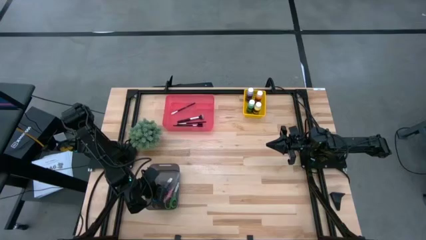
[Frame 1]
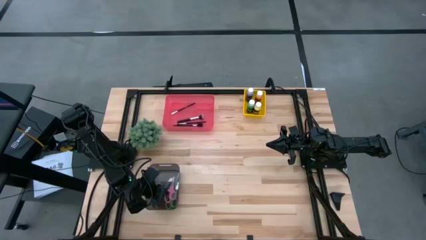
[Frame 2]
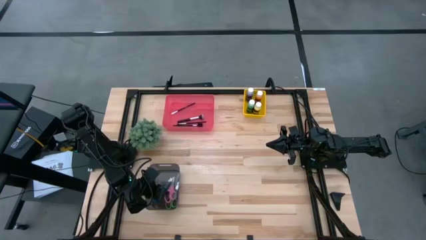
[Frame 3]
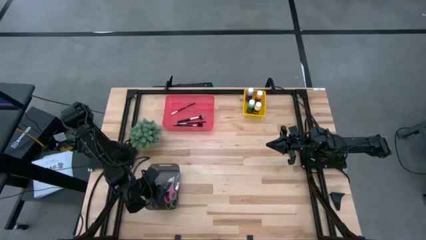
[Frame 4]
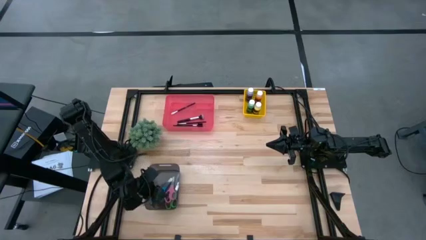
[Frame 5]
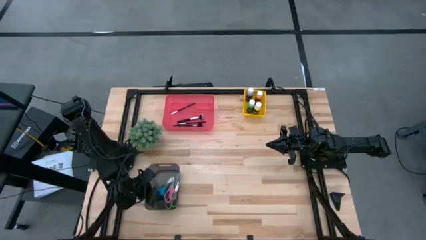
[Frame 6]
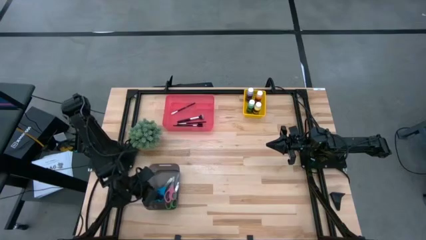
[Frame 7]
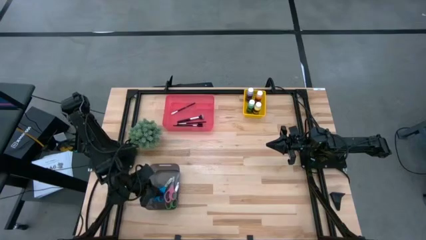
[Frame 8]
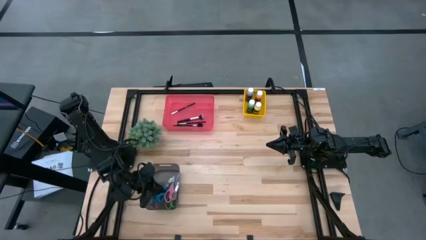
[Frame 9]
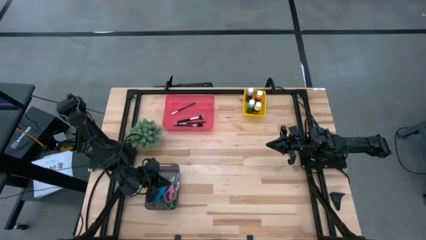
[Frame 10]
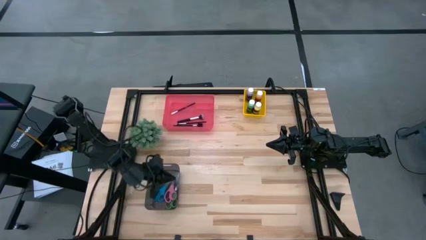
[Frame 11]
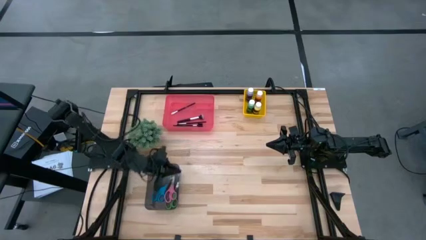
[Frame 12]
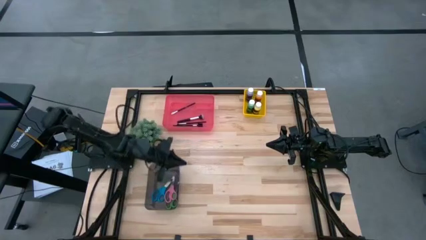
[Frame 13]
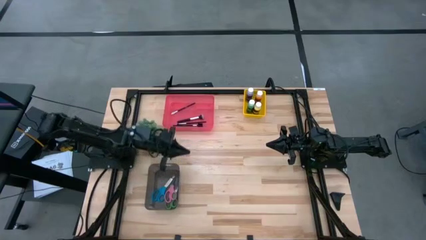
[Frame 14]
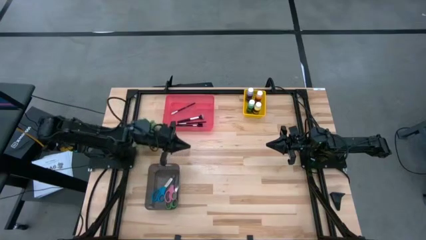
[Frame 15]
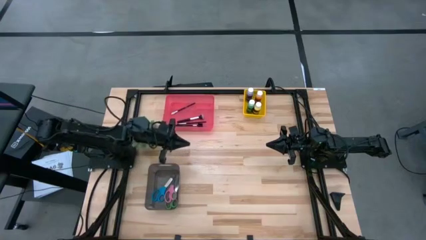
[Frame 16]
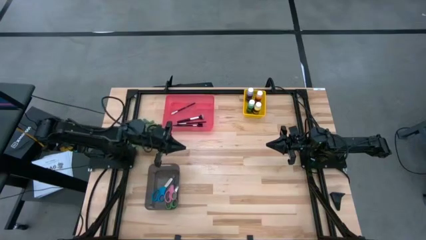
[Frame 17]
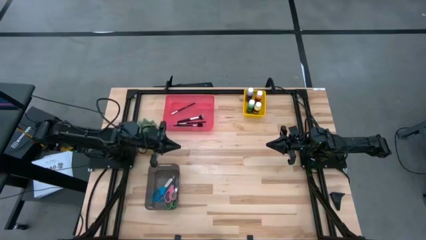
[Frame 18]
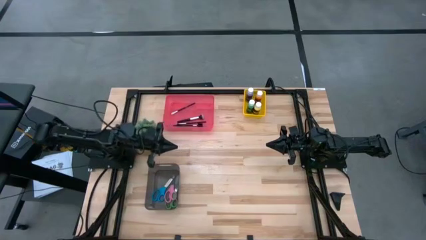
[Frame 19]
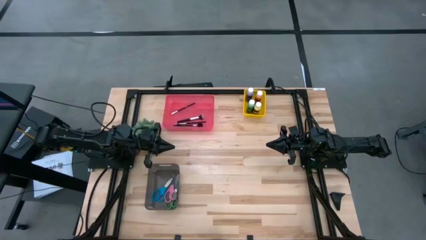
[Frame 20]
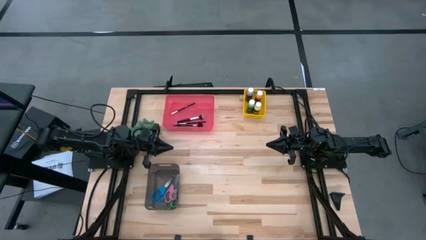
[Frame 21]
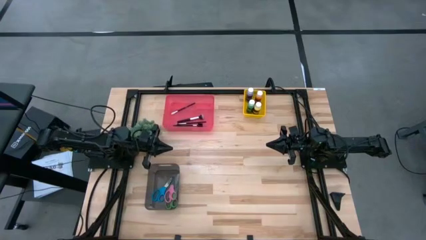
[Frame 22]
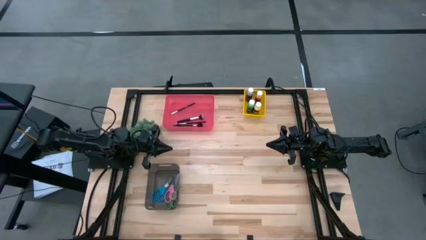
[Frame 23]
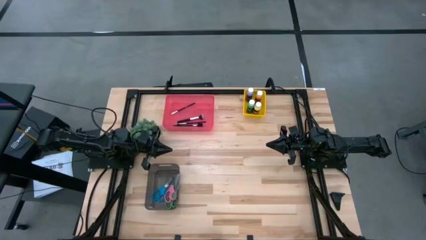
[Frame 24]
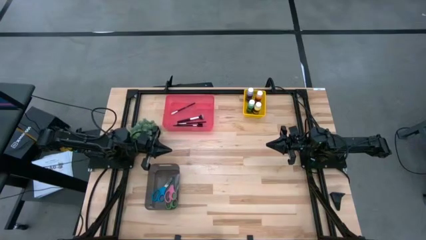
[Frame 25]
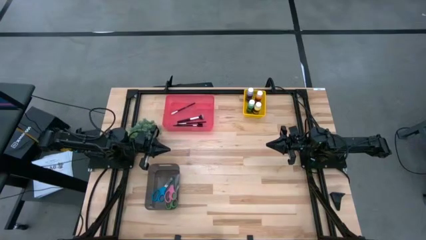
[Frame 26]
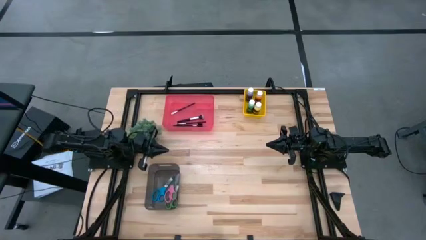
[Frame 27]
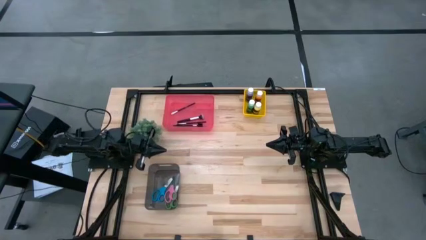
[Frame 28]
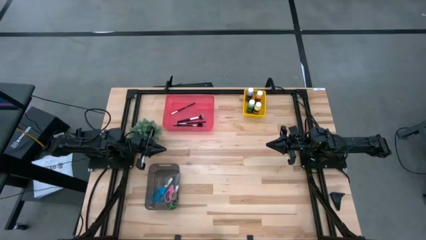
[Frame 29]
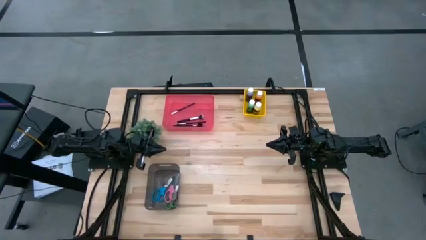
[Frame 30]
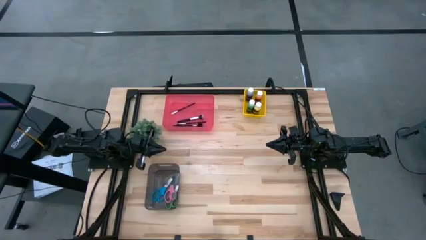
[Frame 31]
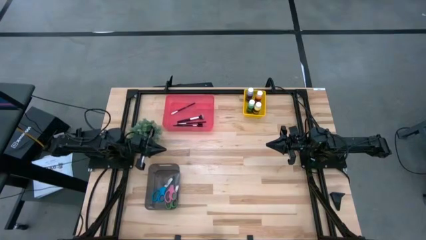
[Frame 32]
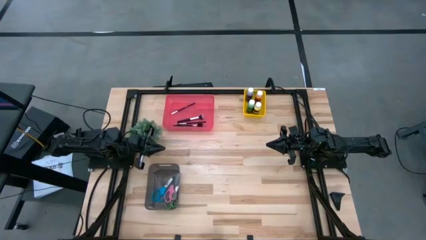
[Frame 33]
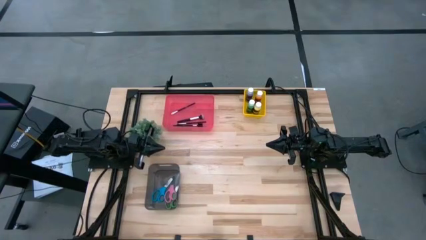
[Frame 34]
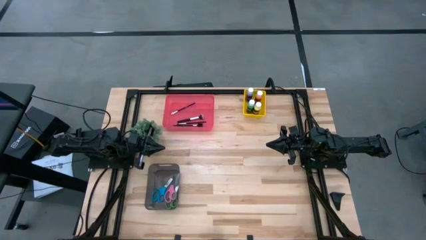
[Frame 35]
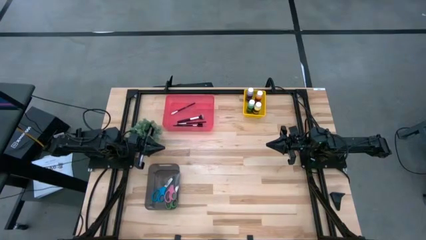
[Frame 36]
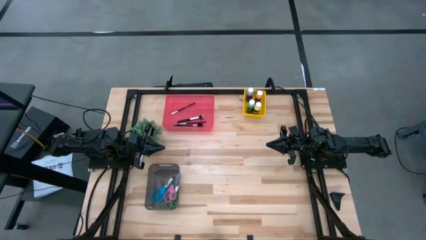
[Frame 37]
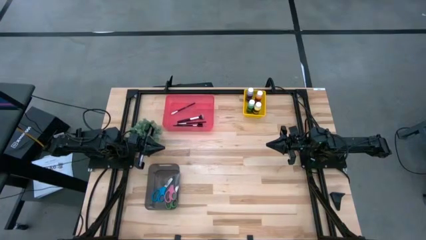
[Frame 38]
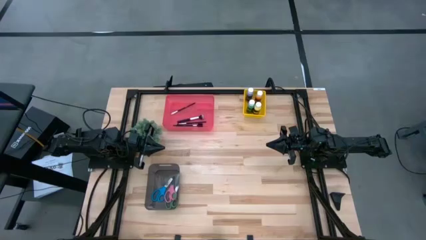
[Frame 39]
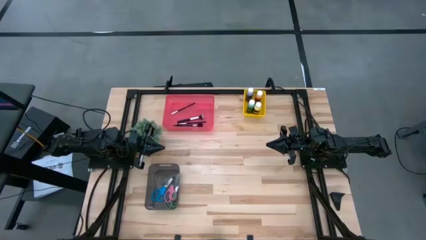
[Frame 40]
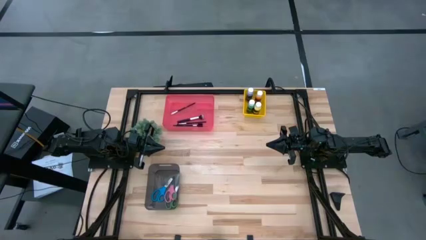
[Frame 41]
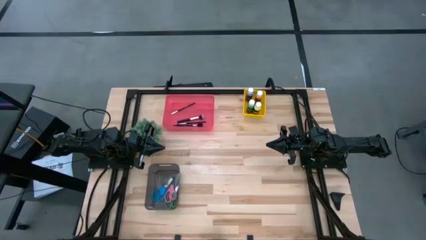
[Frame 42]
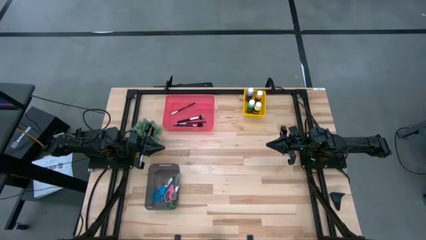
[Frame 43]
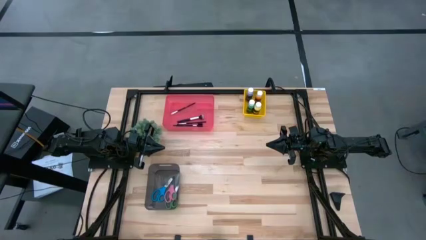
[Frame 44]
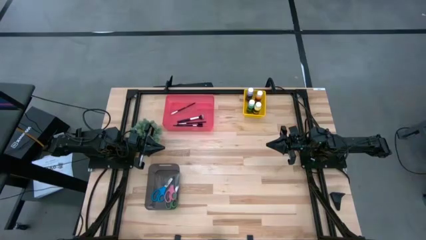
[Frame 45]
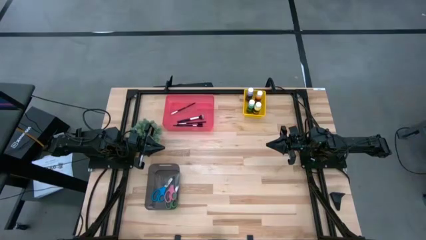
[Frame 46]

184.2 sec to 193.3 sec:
Task: Pick & Place Paint Supplies
Return to Home Position

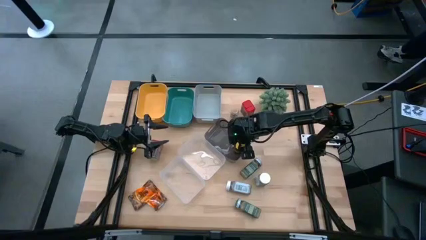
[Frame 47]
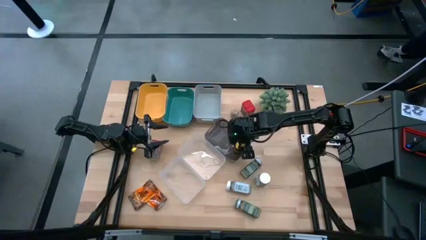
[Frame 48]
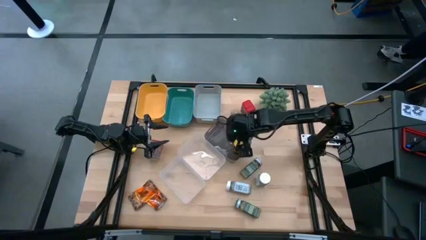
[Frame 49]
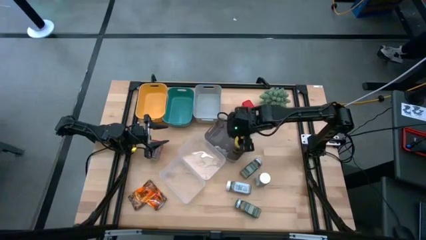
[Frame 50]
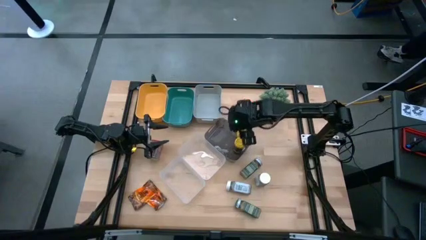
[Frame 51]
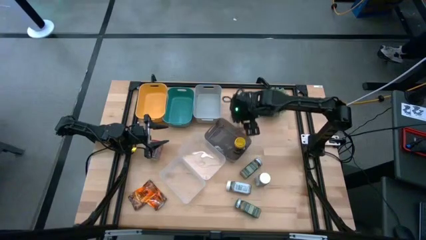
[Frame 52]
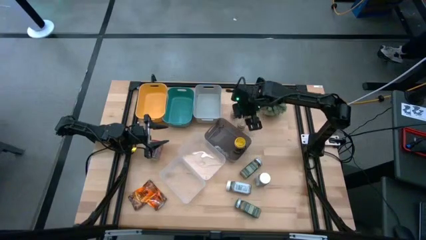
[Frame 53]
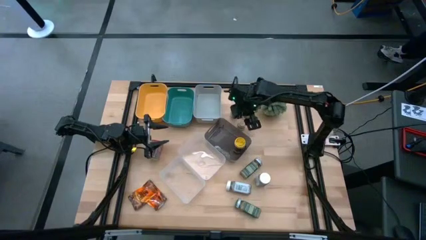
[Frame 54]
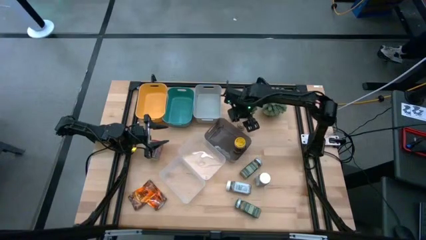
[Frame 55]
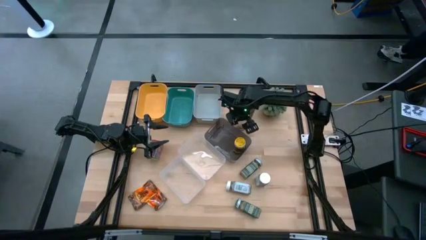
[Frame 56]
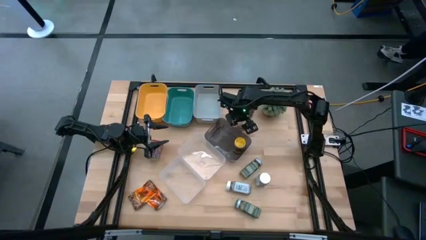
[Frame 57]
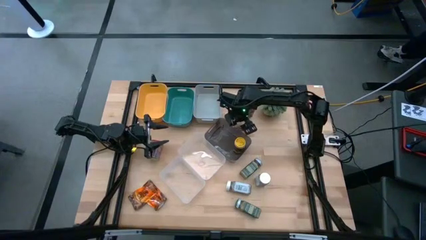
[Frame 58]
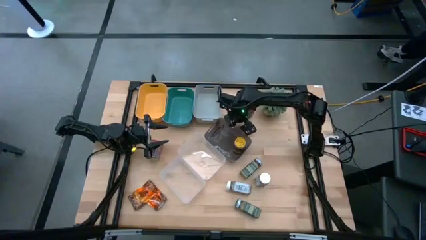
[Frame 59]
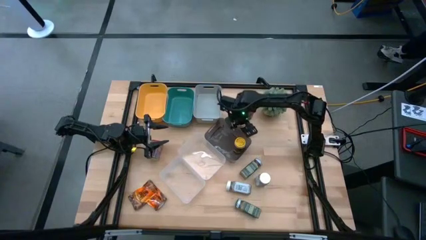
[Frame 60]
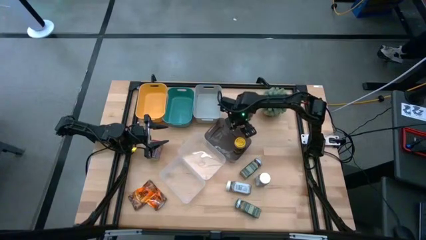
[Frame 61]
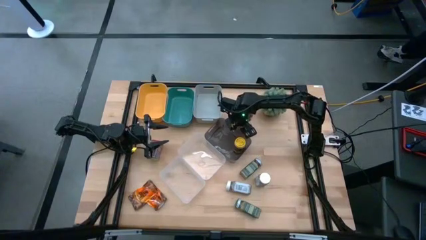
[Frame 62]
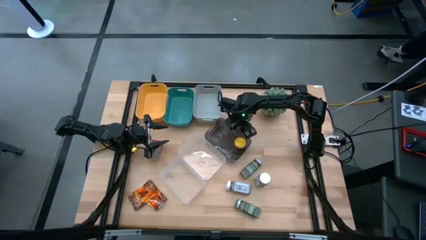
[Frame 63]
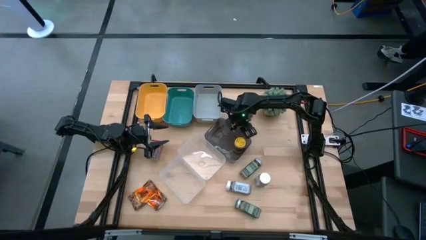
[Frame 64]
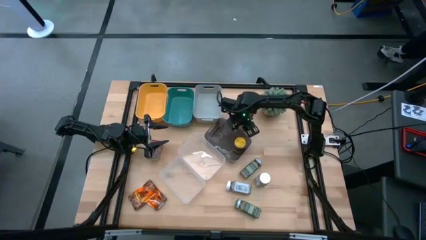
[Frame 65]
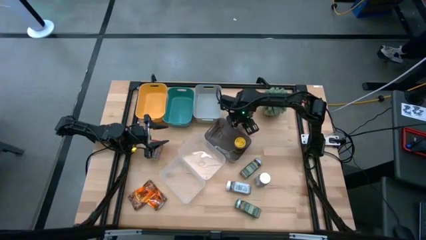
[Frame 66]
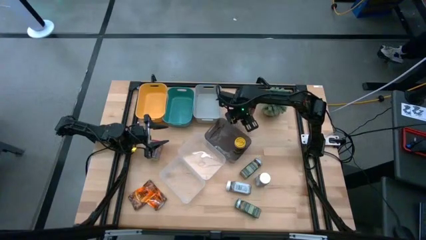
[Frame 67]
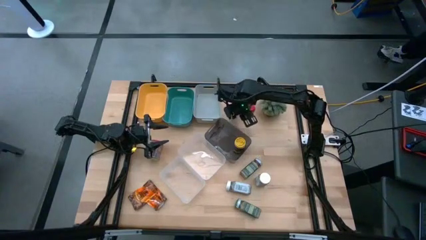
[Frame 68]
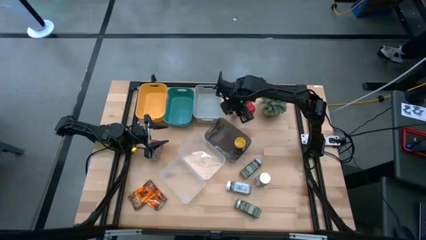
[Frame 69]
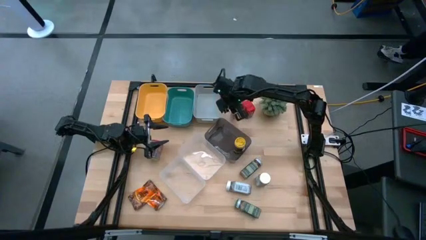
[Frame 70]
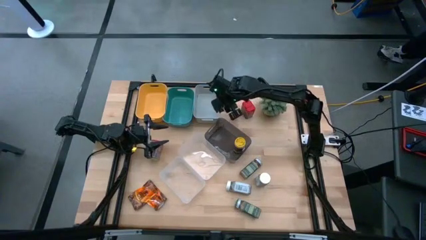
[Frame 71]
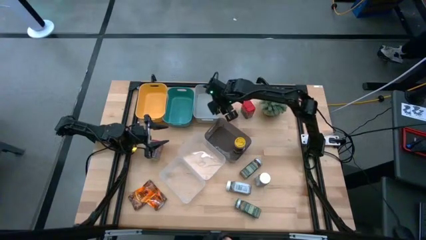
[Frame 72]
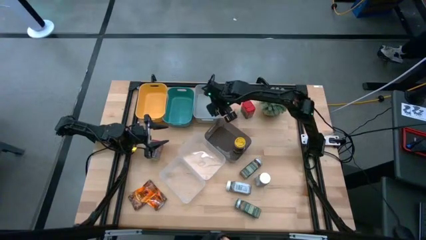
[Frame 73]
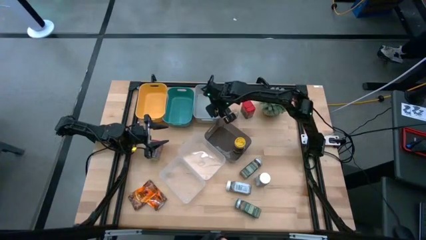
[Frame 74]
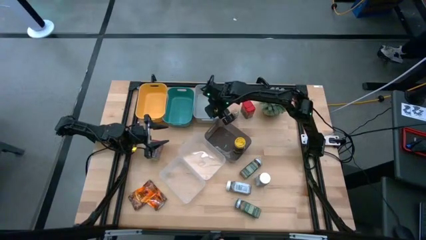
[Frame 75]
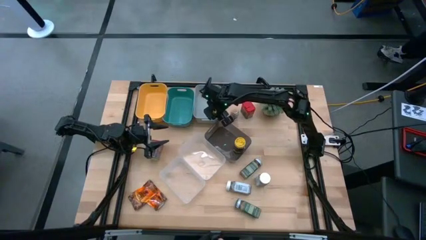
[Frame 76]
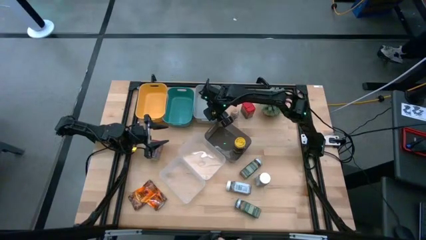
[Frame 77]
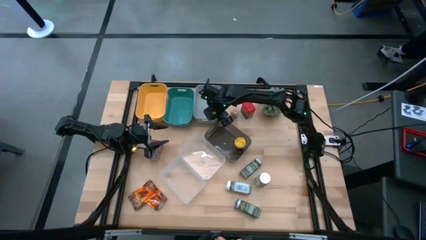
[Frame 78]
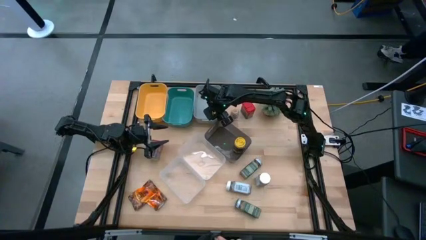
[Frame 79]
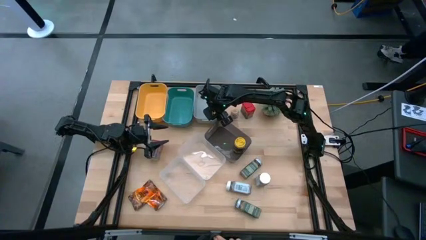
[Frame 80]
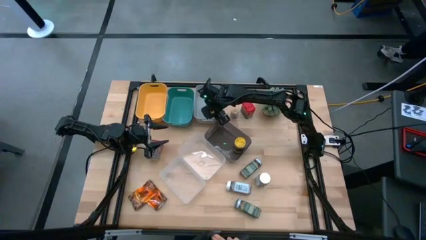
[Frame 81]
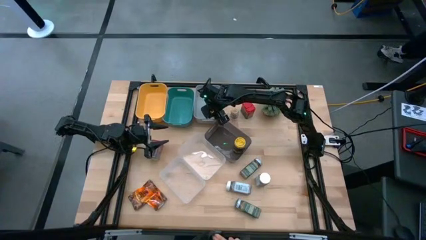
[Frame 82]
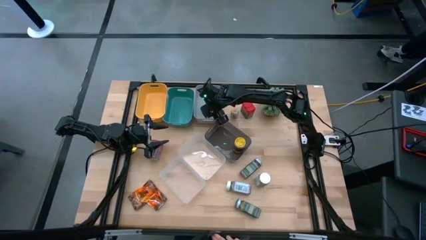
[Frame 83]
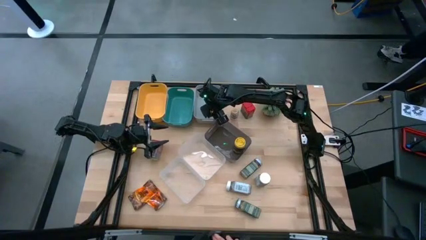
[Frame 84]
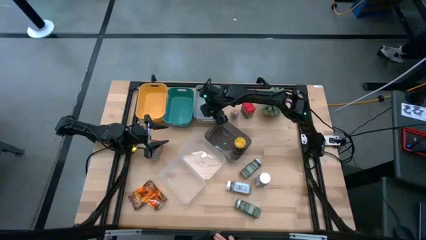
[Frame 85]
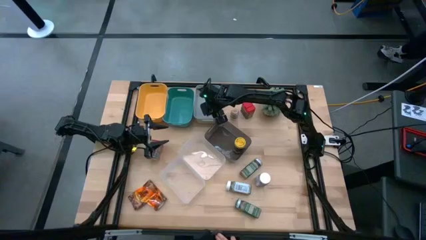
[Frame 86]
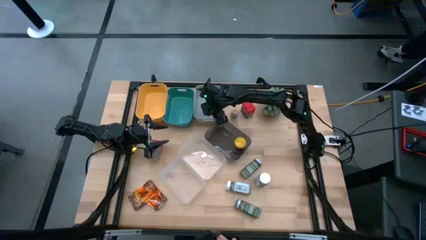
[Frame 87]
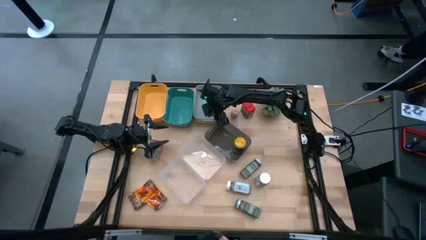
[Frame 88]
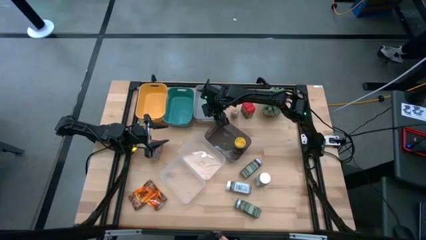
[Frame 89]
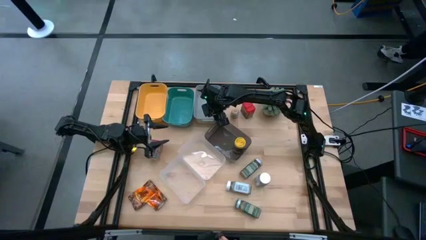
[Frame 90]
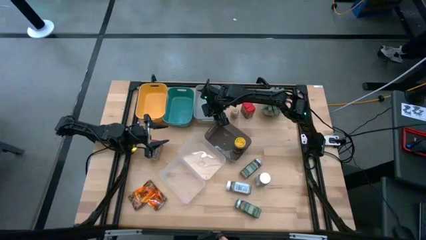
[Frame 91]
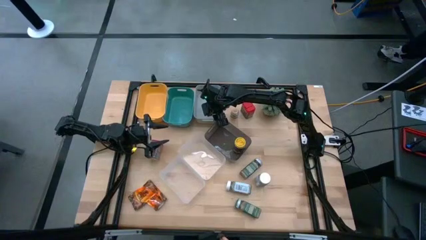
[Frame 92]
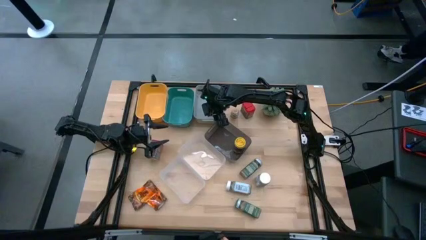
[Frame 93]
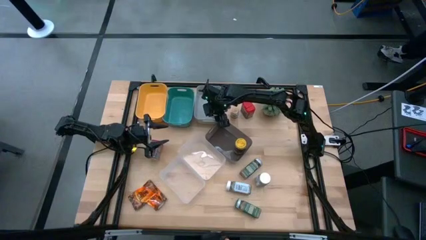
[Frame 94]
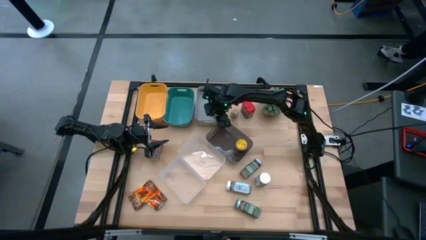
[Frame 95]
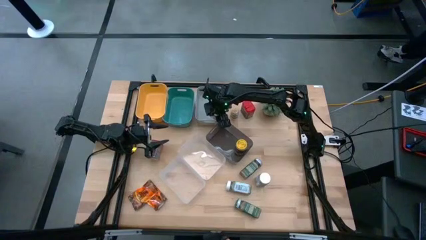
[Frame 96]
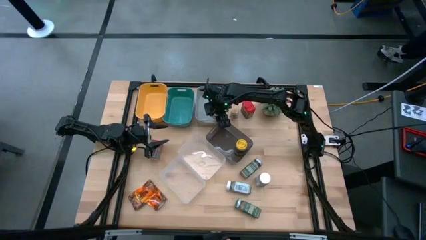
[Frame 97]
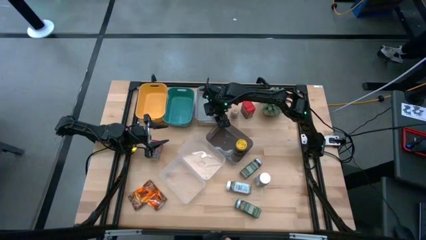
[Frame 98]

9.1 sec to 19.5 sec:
Task: Sort spices by type
Put the brown seasoning bottle into the gray bin
